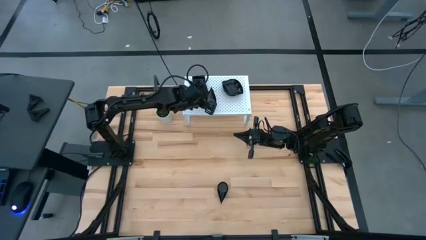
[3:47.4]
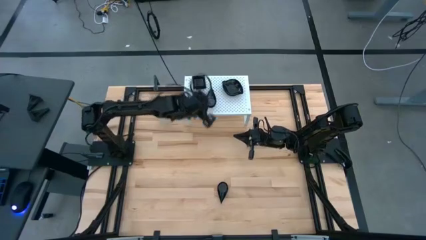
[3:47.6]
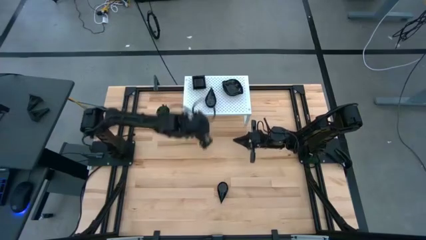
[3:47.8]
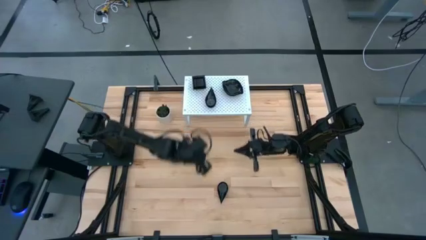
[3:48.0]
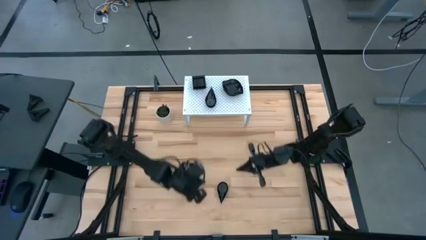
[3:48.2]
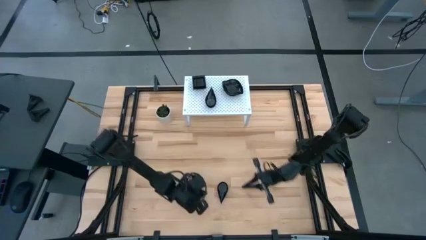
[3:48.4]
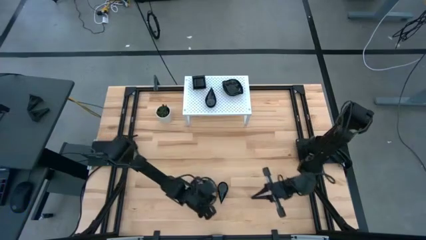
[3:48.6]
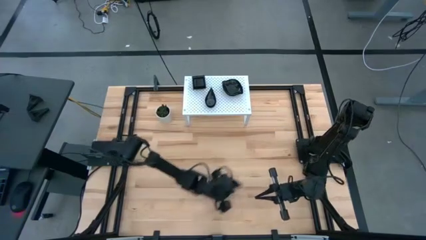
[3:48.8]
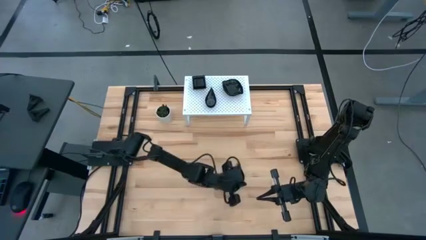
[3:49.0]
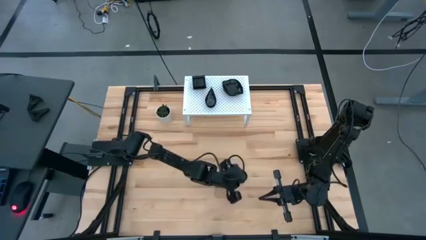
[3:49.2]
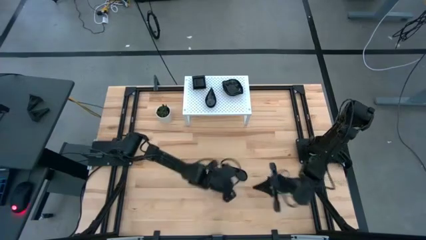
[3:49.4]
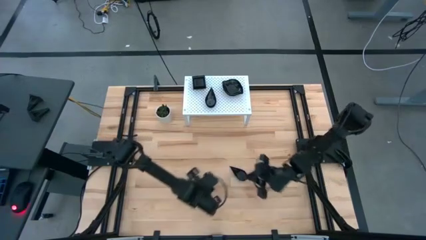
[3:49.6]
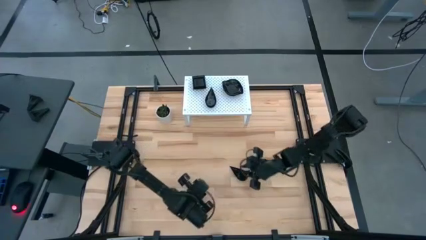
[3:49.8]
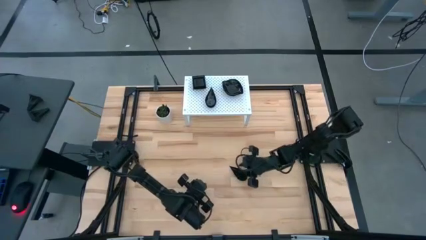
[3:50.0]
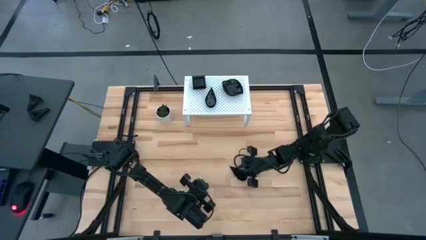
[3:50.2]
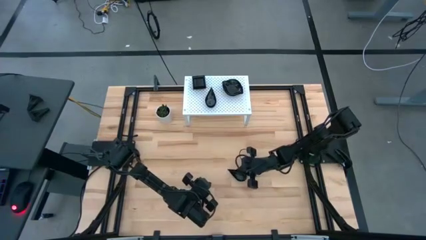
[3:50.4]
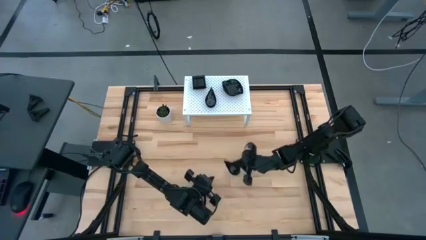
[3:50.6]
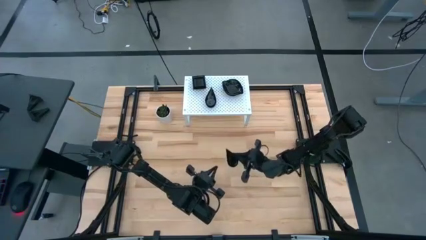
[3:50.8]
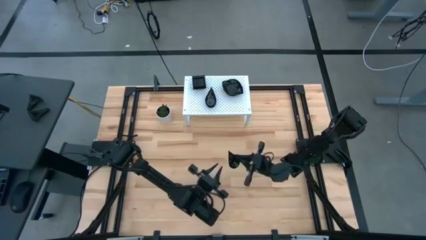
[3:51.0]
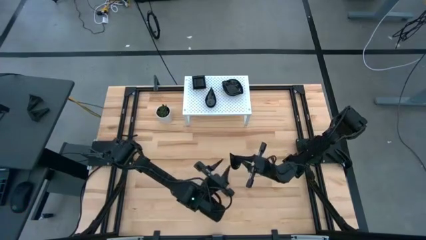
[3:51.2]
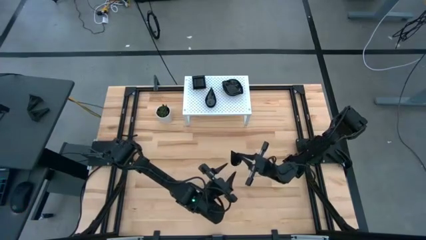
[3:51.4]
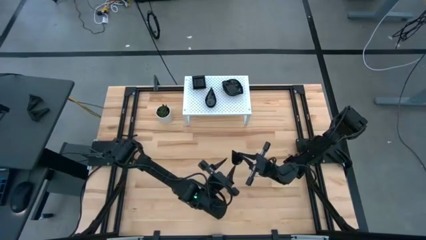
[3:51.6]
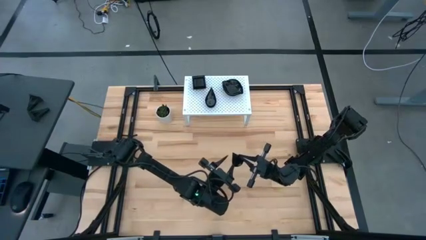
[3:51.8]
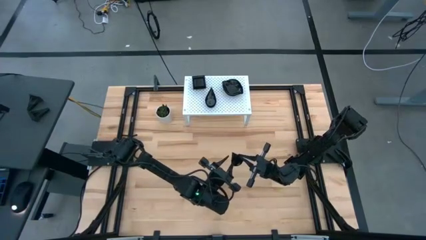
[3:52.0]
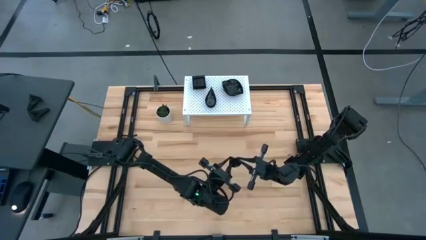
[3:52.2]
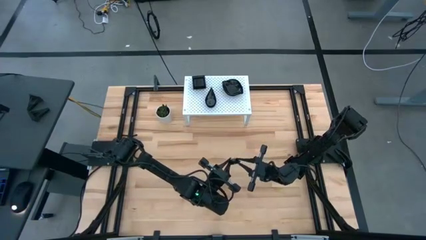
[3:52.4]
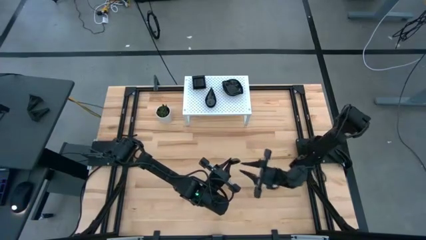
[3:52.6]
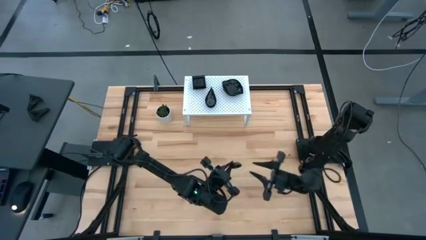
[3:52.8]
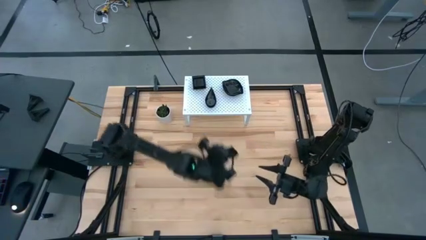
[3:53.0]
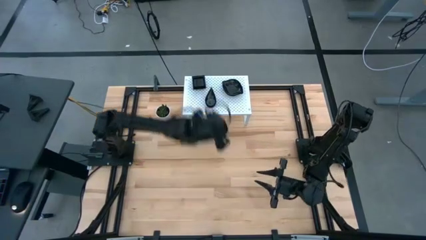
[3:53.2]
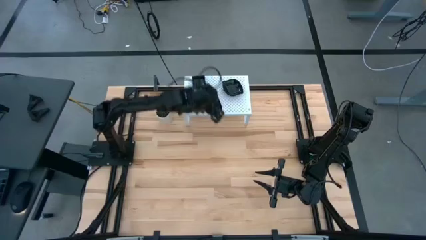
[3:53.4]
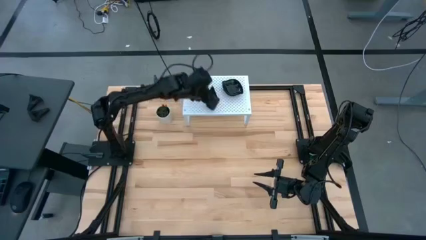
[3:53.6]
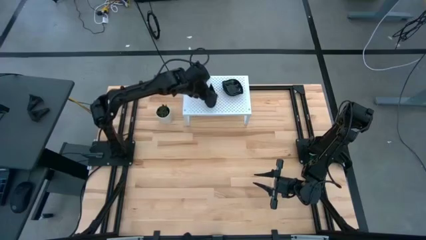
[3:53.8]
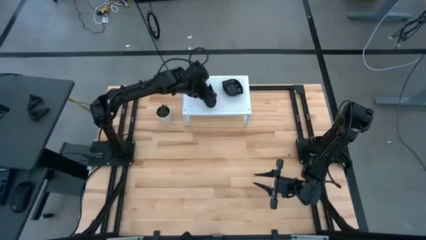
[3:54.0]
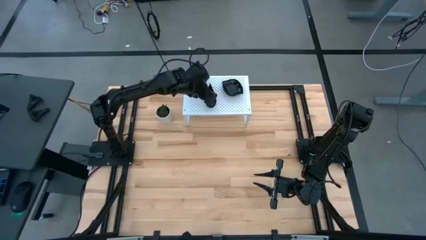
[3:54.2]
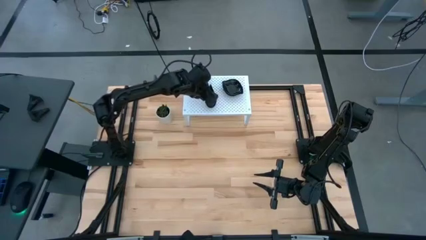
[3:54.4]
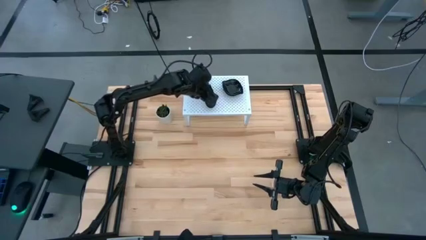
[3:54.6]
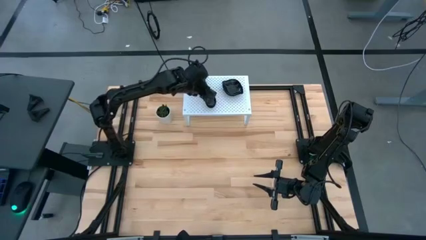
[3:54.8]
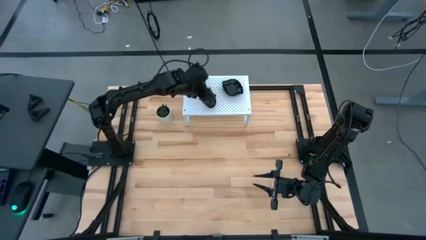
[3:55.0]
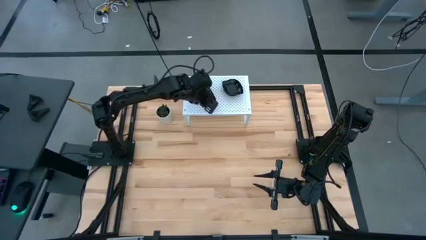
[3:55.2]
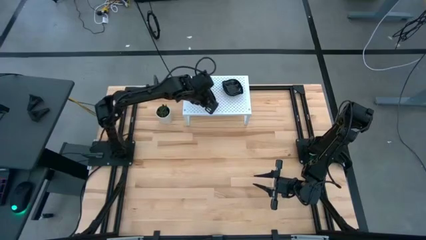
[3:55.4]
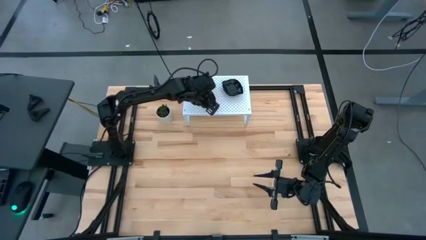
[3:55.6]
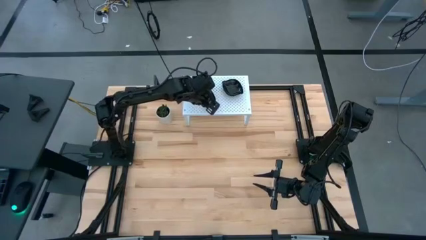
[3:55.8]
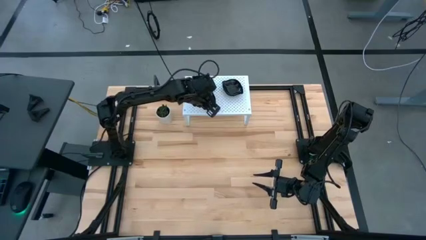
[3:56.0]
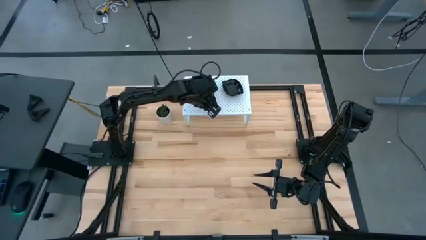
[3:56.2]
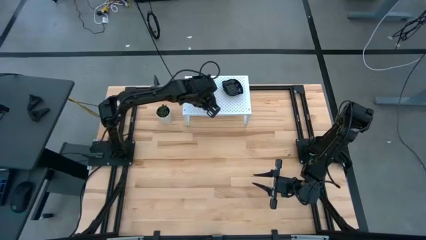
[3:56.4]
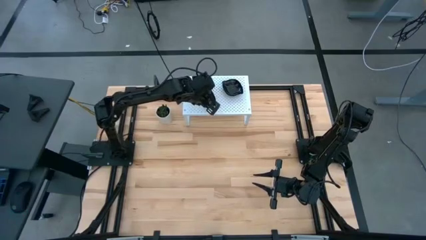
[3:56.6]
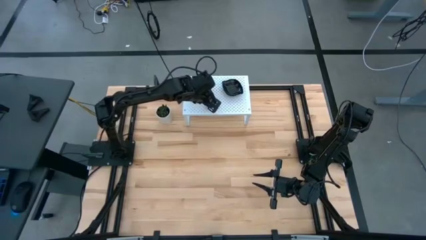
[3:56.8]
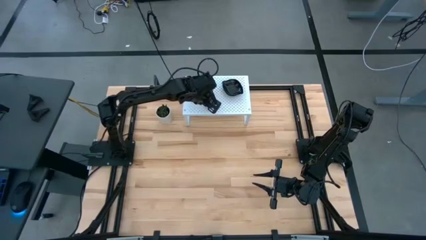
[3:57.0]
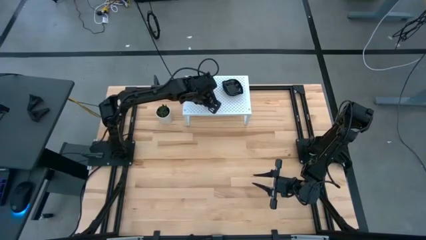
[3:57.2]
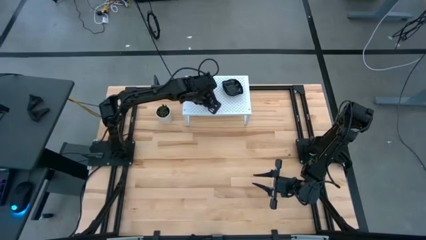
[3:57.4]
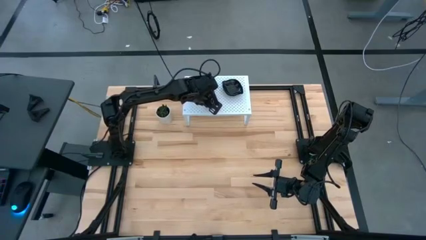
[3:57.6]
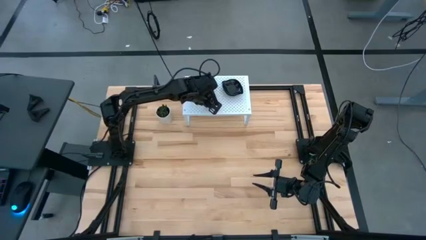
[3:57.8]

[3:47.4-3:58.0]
Task: Pick & Place Mini shaped plates
Stack the black plate on top of the black plate on the shelf

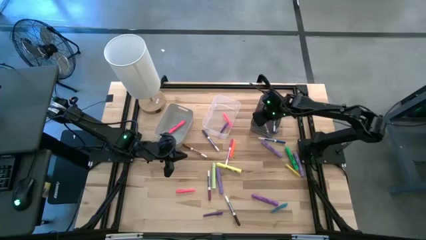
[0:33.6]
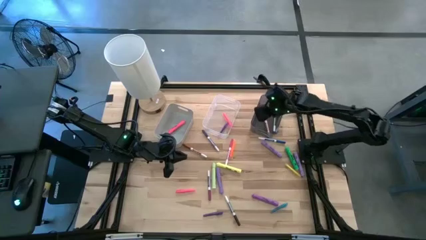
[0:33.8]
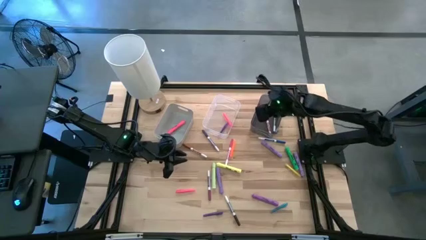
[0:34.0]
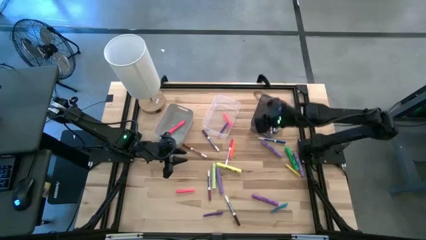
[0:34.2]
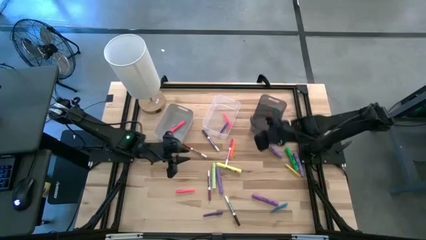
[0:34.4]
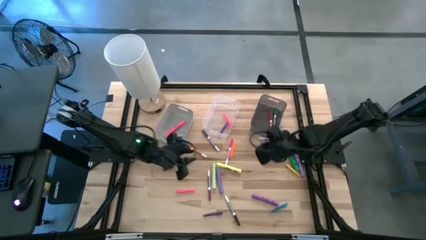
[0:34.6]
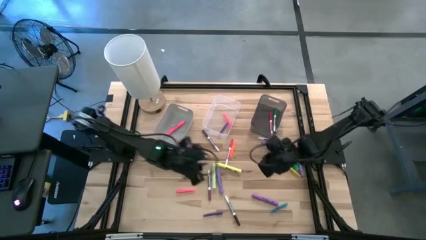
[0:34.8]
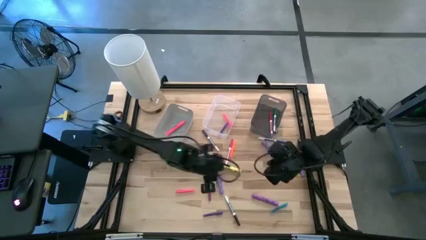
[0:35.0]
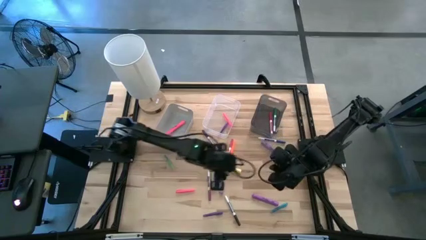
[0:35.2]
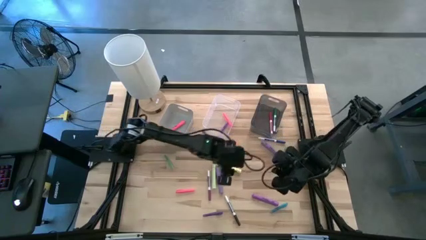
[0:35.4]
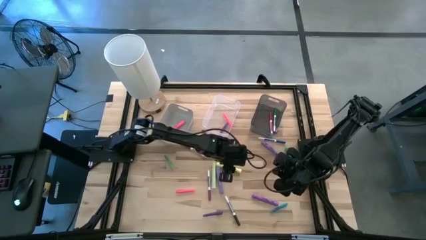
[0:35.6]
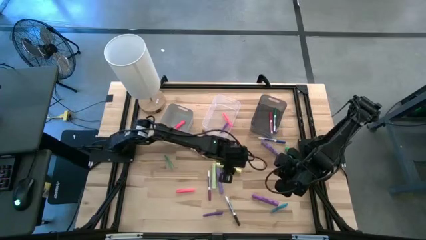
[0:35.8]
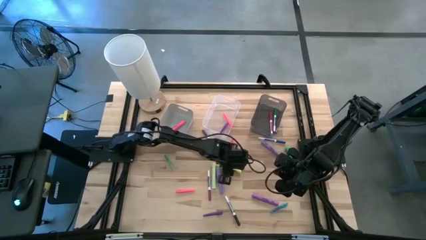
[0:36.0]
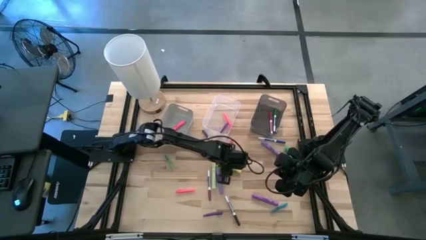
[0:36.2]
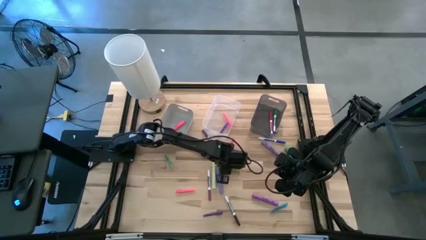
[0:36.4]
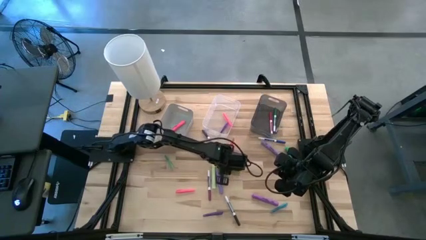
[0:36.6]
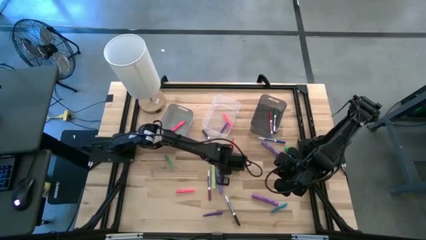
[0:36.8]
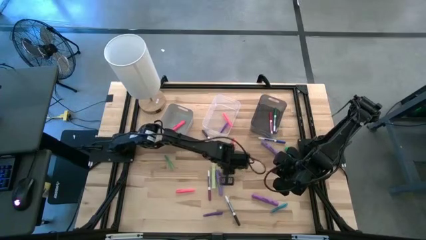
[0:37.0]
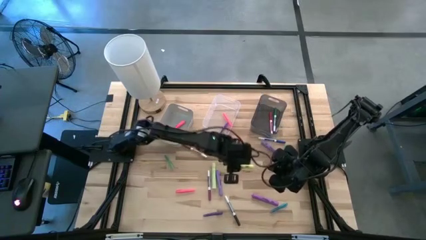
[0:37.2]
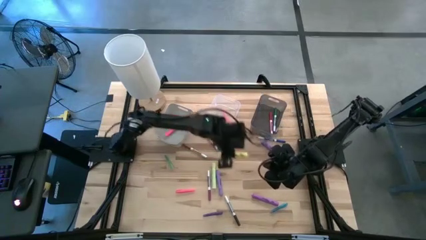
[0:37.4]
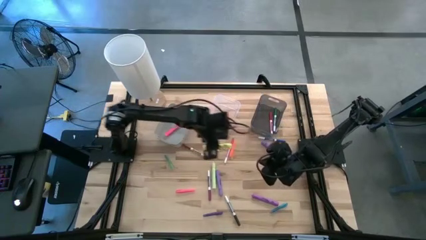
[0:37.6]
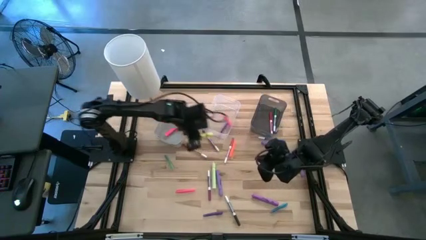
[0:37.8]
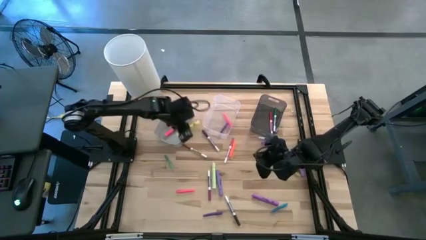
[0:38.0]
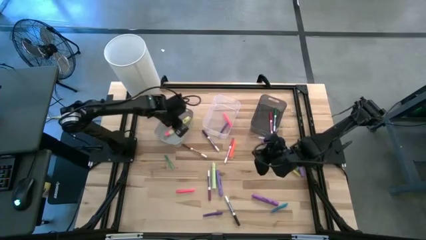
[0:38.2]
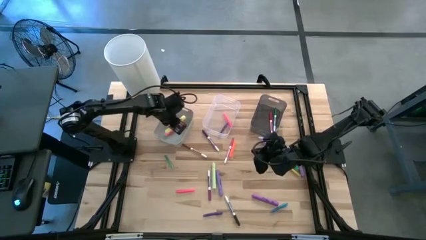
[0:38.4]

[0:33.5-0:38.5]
Task: Pick & Place Markers
Put the yellow highlighter into the gray bin
